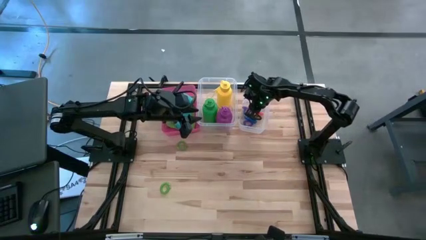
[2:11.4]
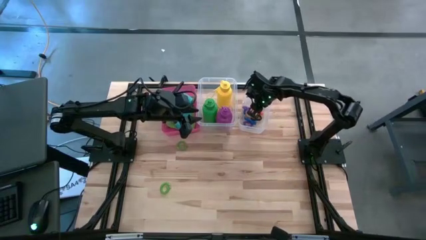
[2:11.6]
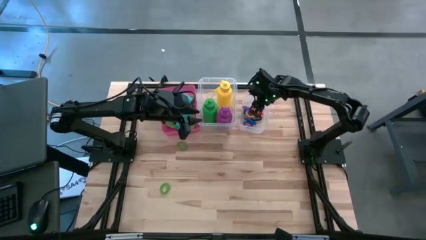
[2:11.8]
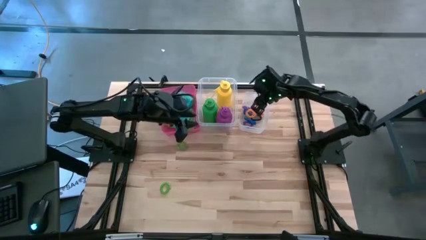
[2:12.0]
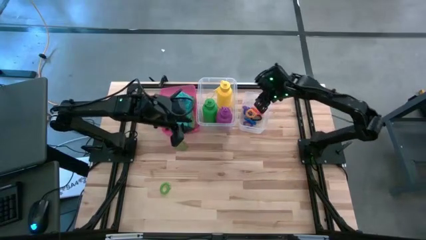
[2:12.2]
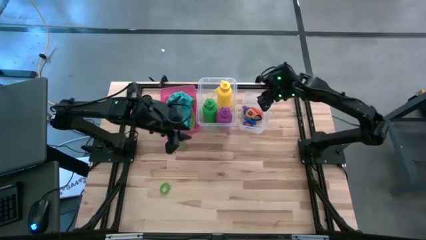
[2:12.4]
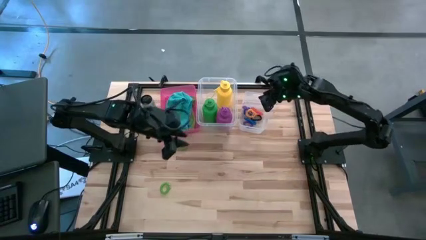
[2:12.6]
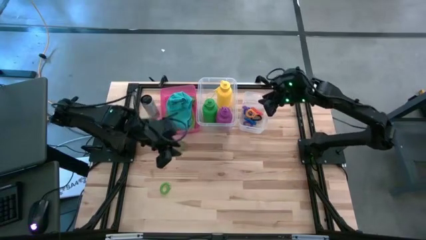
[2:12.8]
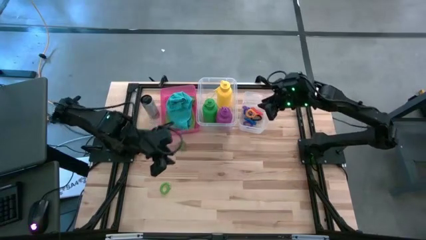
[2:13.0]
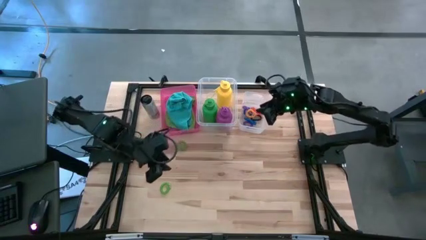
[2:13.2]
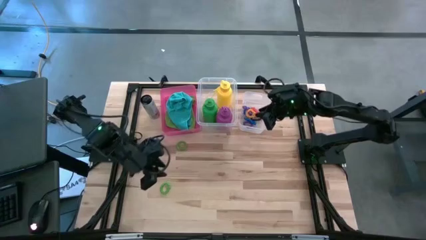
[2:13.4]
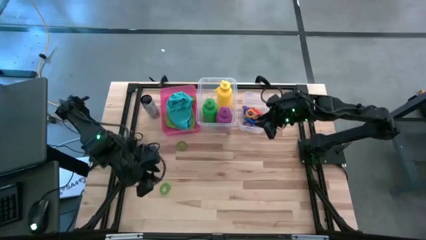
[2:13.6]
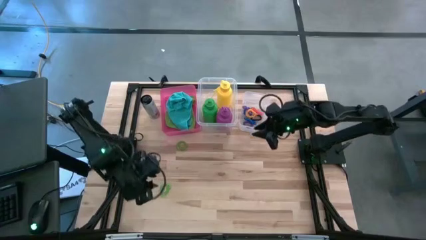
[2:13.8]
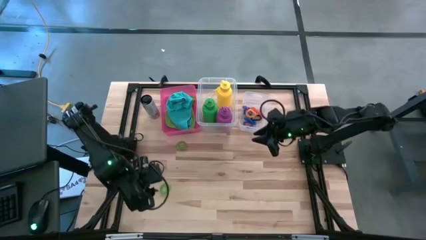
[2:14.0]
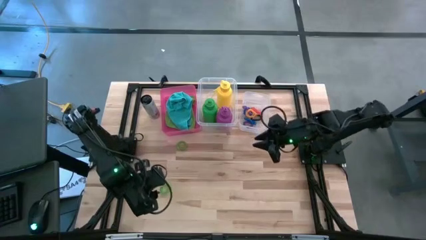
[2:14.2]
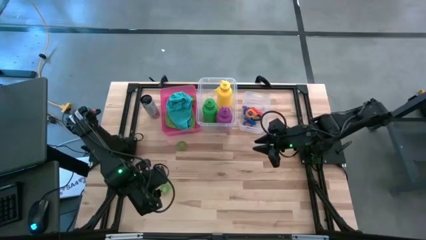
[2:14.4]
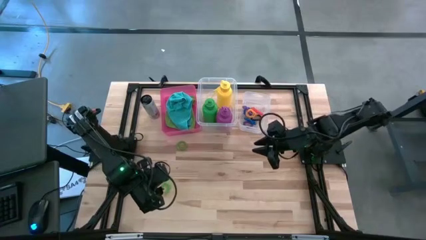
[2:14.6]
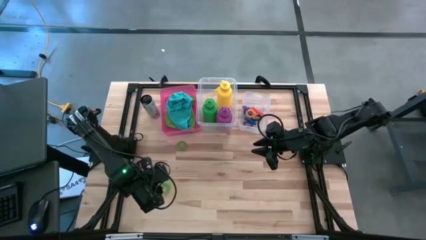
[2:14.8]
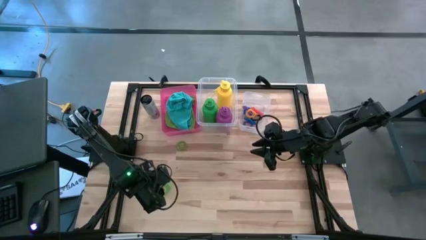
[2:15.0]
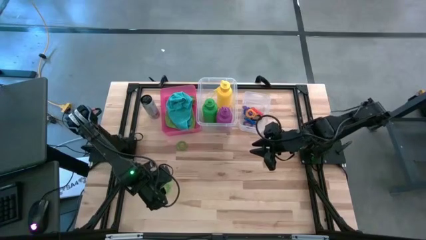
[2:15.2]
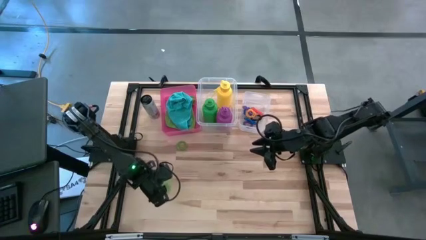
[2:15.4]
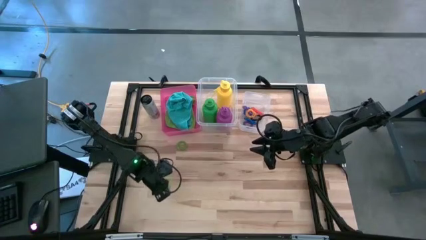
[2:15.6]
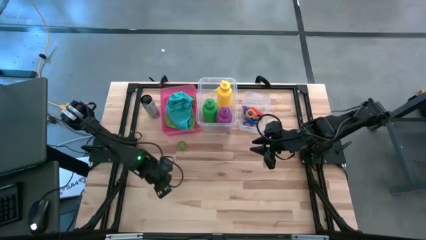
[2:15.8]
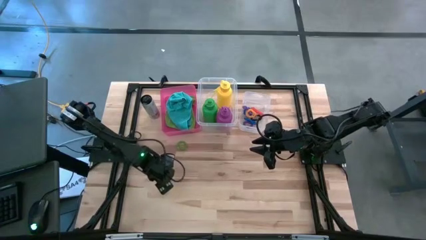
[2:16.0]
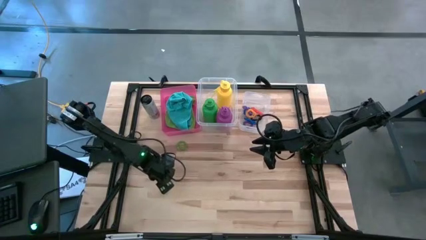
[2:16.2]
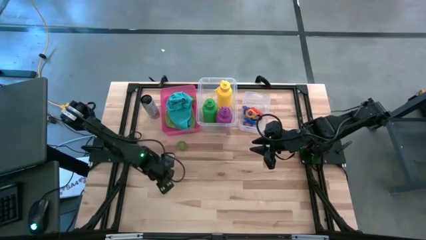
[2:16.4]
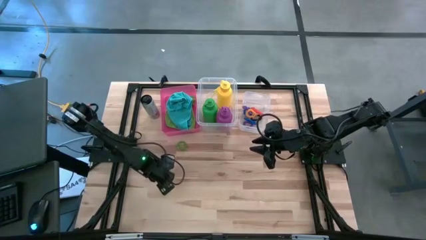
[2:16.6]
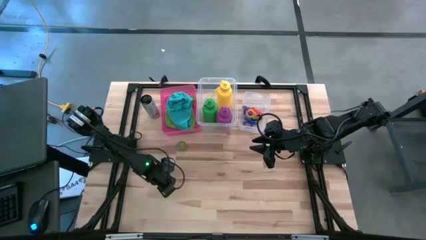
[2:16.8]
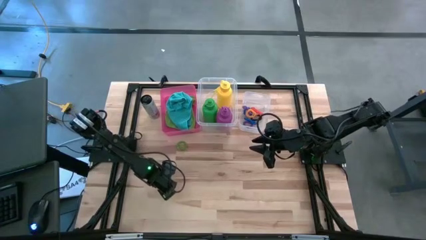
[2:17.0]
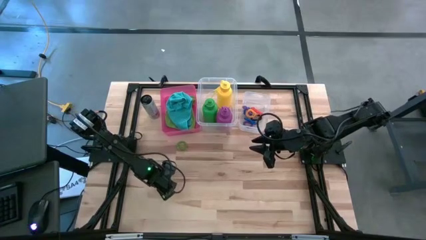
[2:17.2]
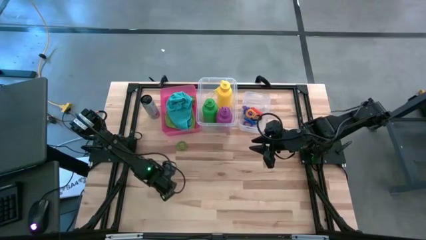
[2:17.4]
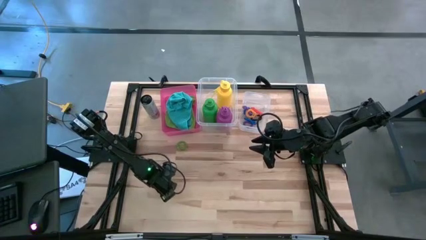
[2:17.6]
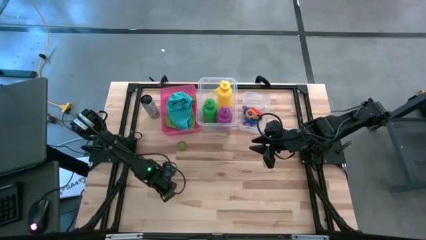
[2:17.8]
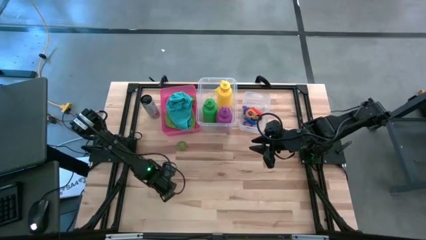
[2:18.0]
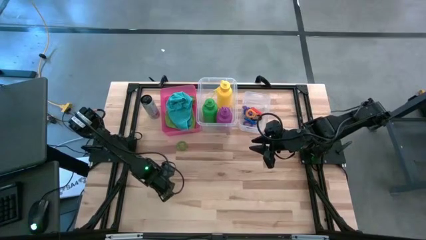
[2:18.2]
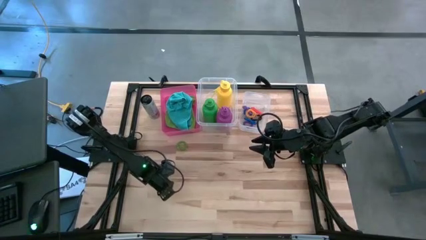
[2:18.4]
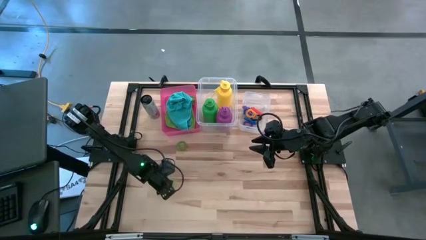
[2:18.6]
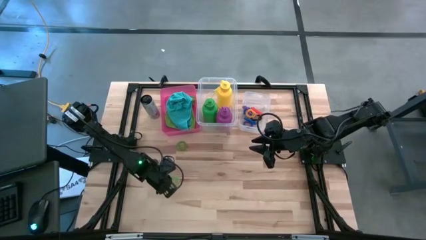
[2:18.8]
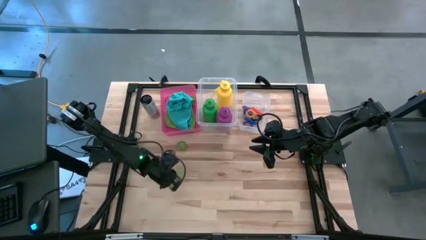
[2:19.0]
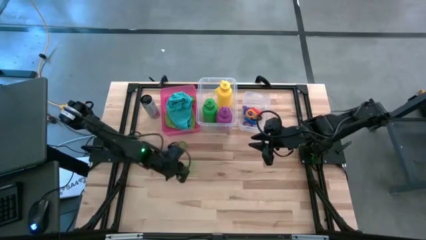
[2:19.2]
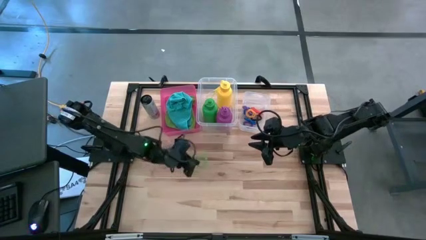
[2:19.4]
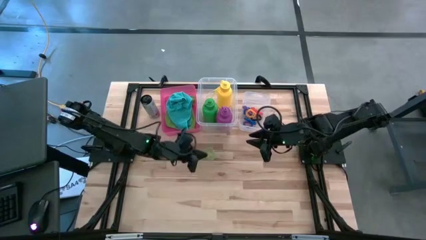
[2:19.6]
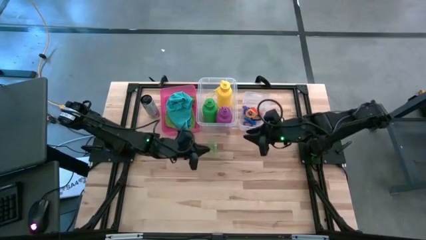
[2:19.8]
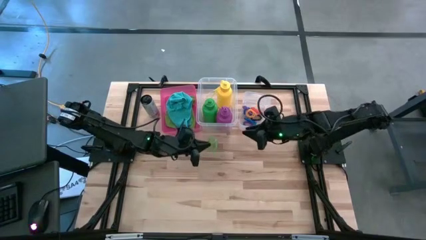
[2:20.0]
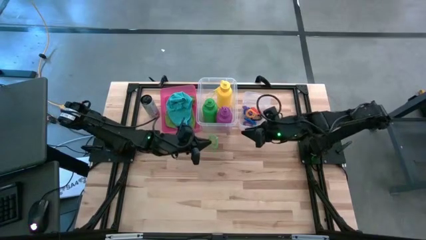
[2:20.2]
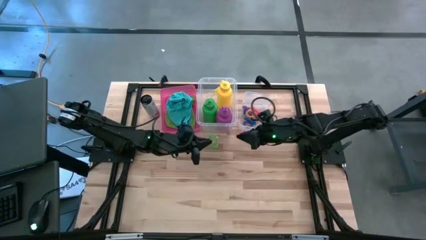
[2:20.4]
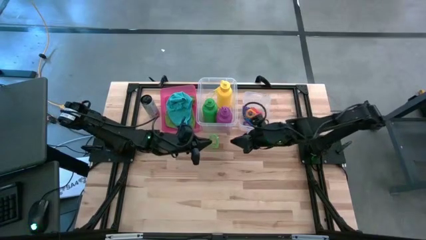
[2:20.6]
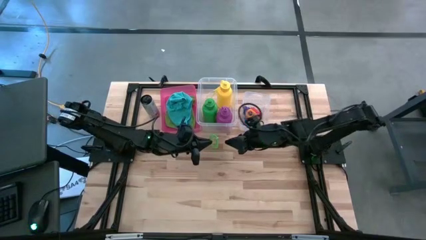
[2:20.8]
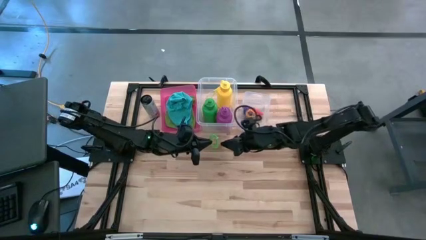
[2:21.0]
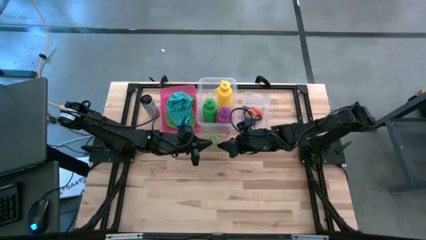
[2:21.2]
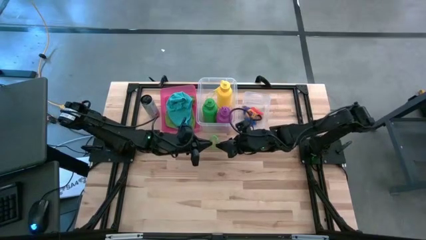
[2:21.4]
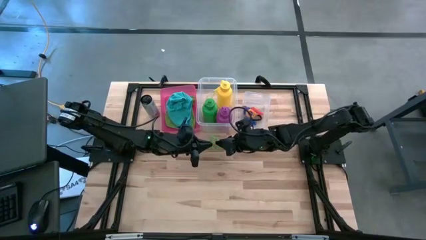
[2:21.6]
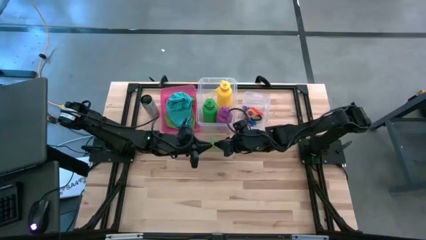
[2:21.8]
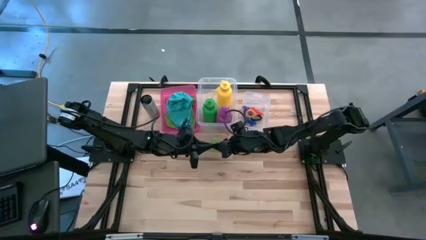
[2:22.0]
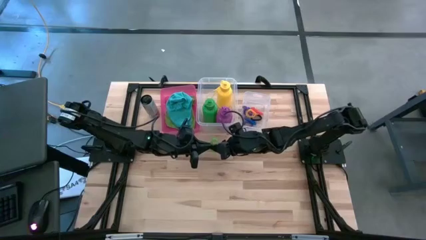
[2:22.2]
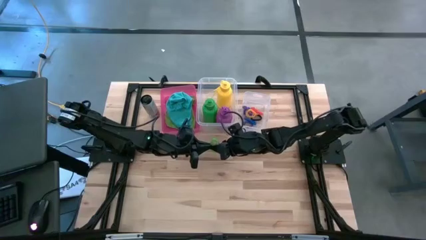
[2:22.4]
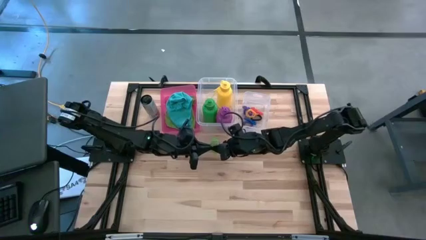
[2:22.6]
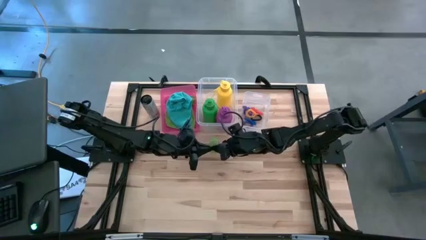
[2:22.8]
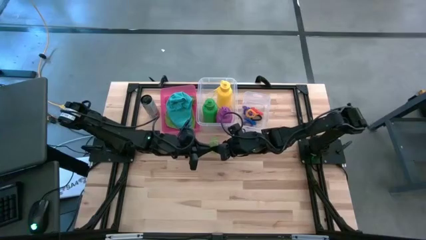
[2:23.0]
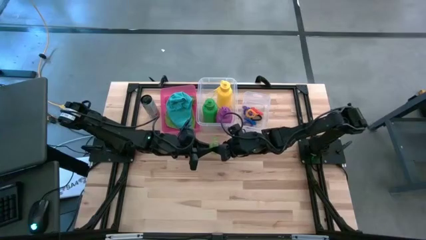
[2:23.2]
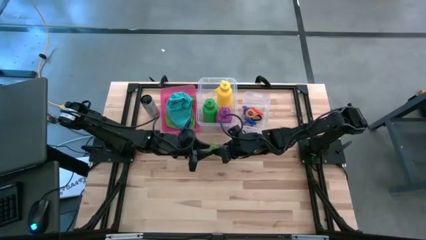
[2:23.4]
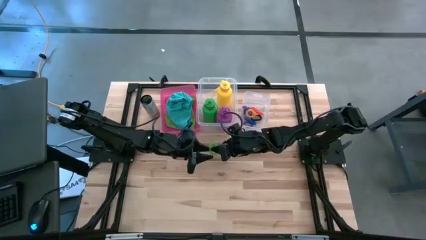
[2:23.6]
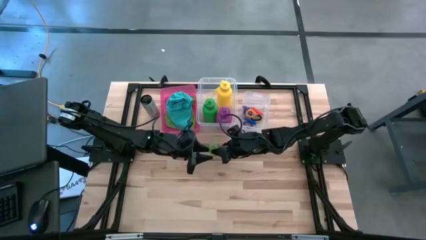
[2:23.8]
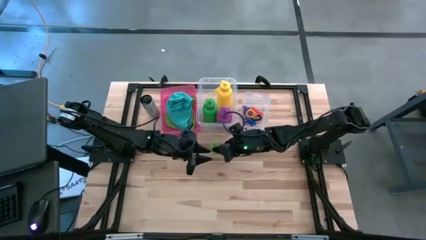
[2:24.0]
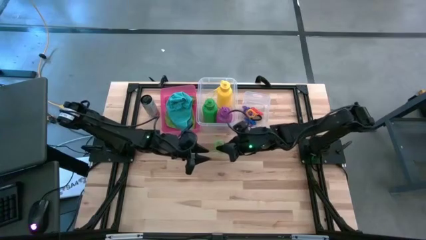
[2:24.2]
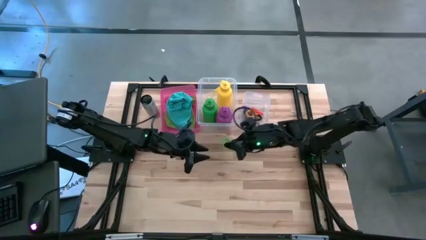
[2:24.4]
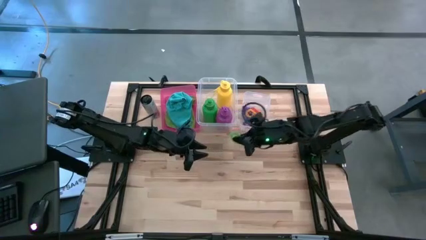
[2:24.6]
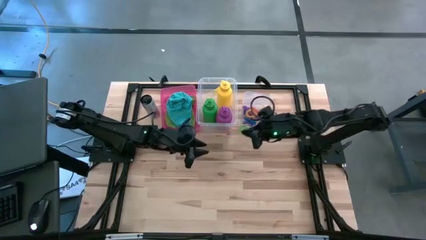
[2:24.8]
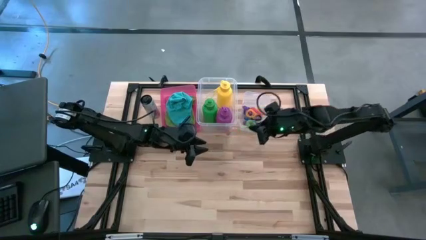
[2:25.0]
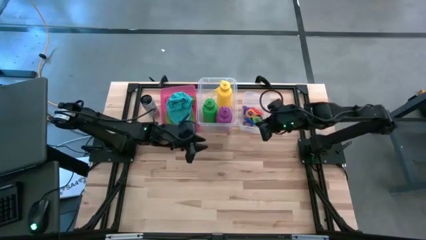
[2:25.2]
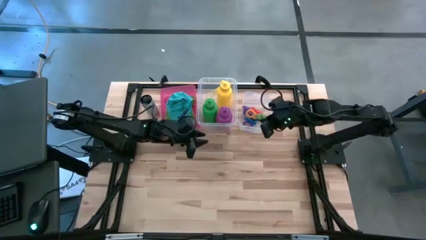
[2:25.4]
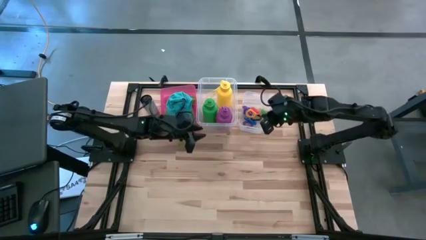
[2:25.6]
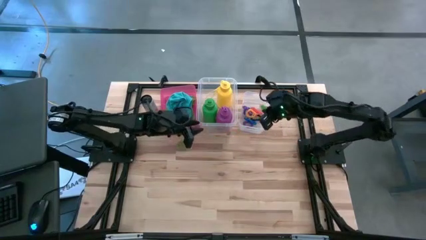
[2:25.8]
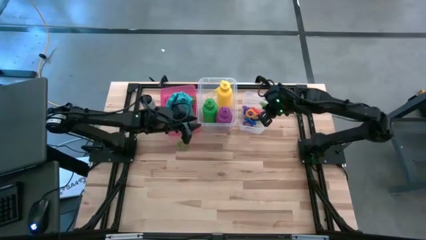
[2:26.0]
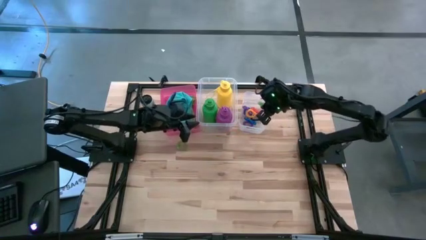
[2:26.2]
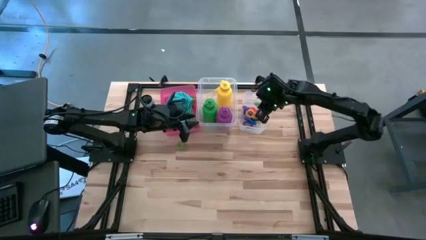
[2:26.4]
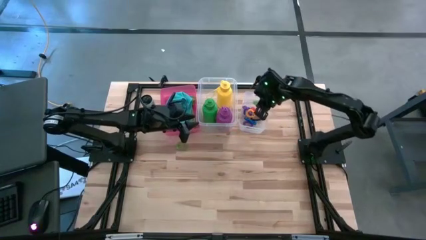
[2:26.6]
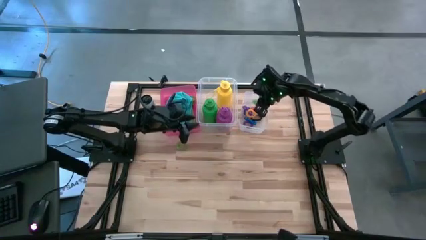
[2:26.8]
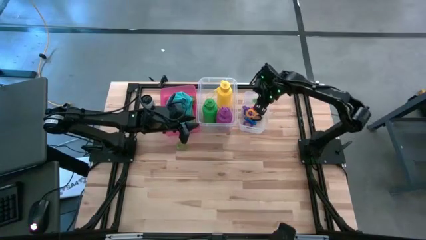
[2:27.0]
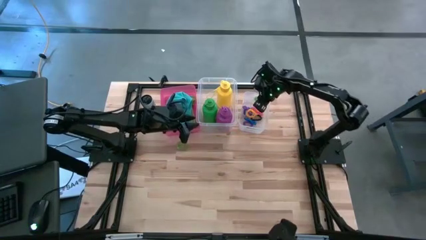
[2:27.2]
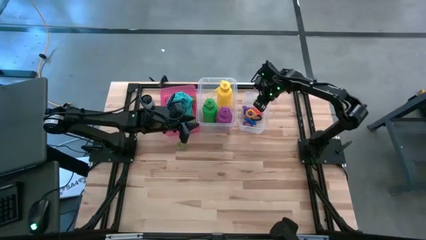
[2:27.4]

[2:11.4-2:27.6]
Task: Pick & Place Sports Items
Put the bottom green spring keychain into the right transparent bin
